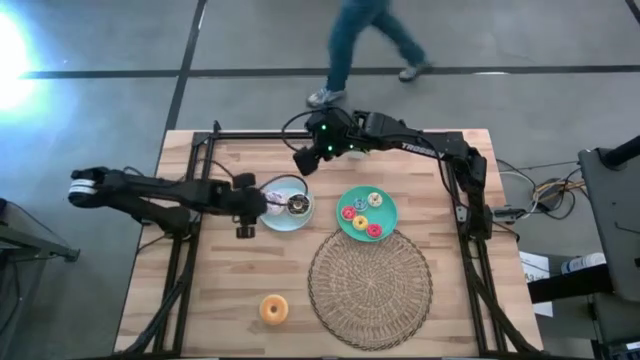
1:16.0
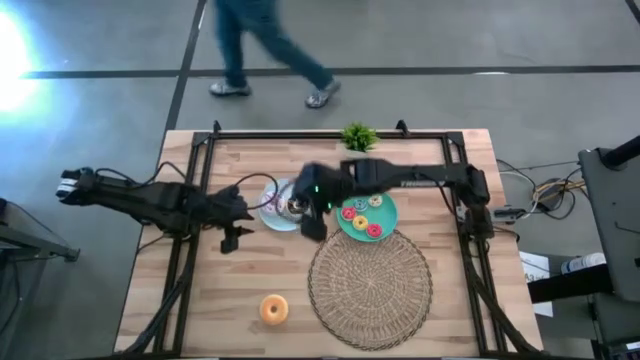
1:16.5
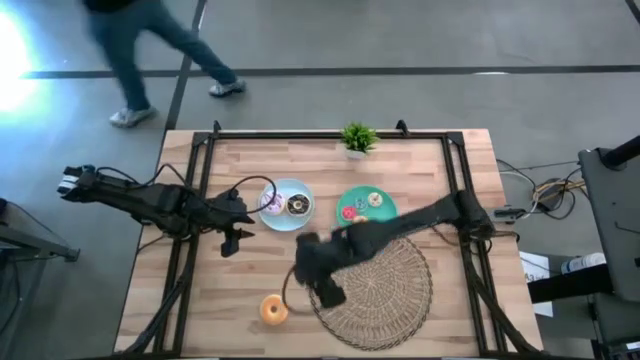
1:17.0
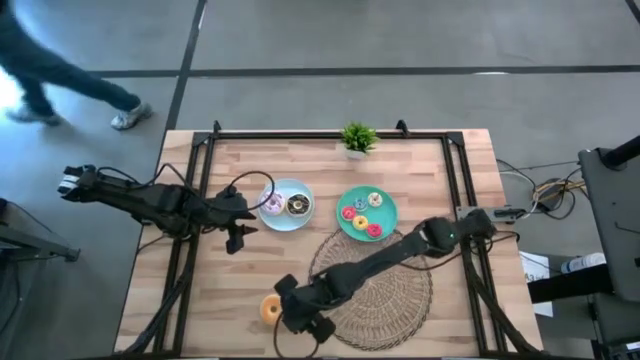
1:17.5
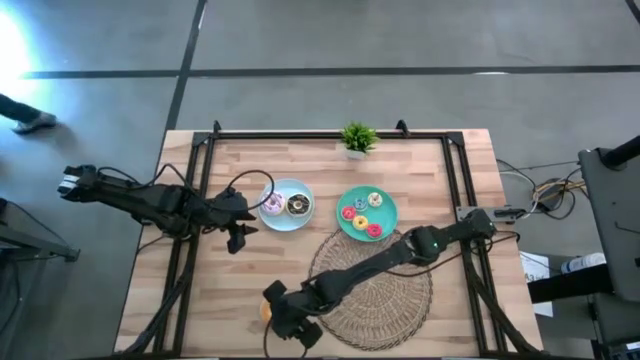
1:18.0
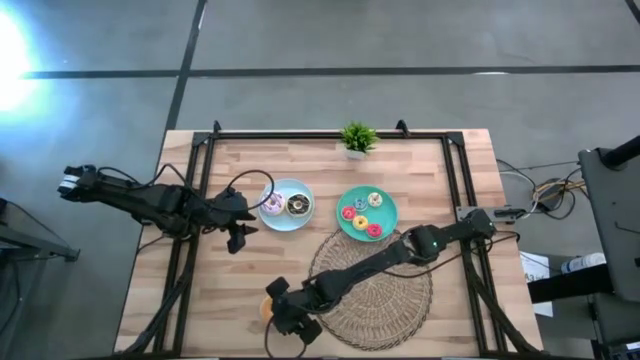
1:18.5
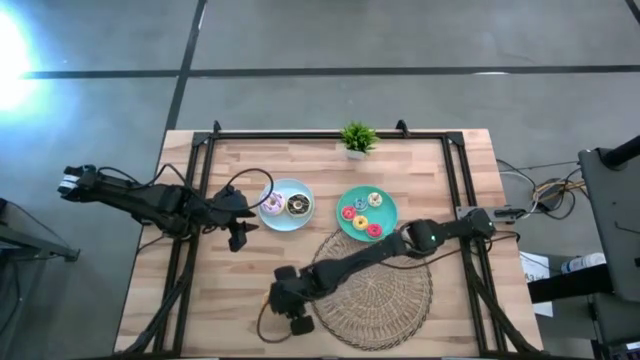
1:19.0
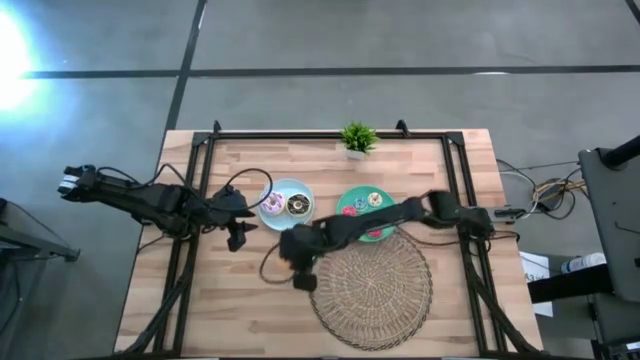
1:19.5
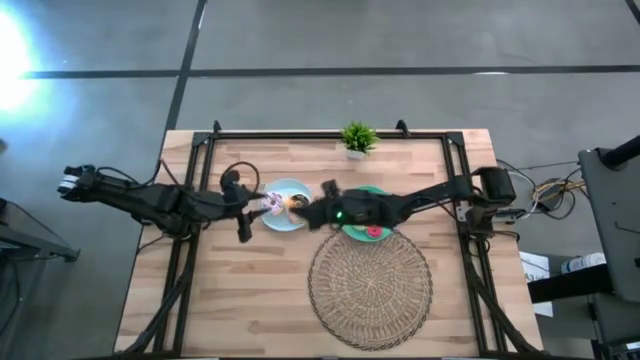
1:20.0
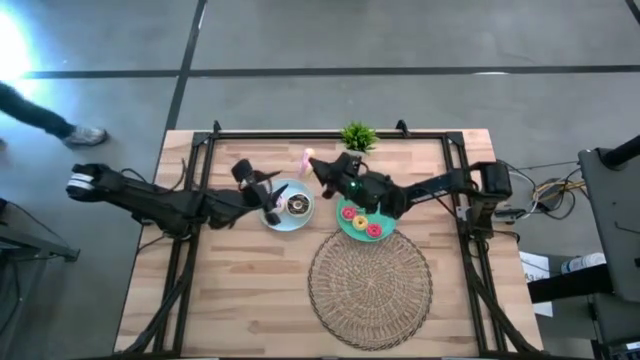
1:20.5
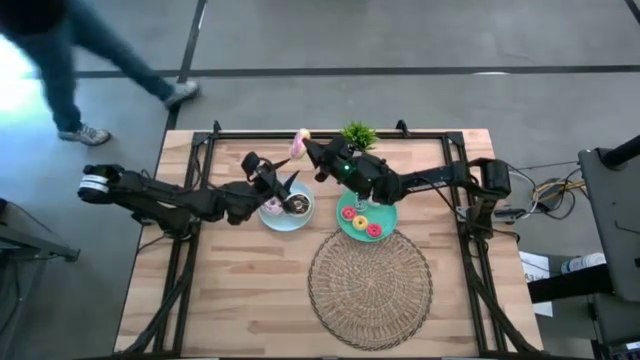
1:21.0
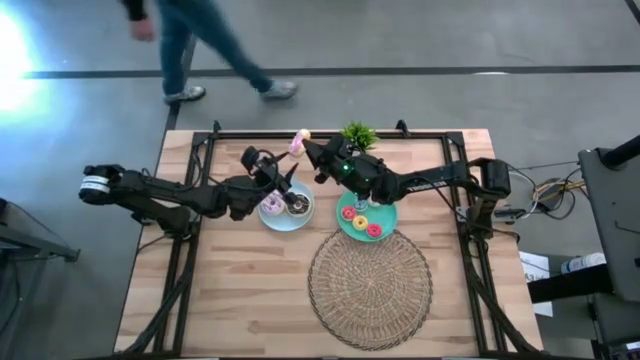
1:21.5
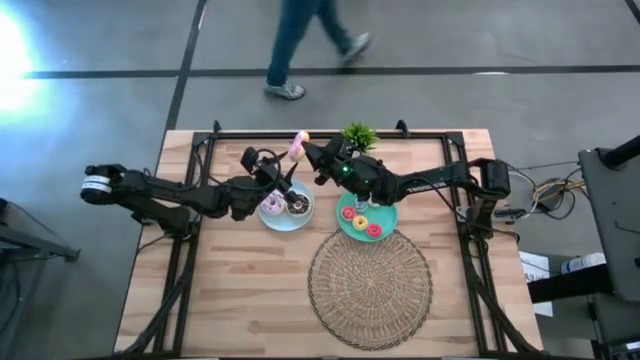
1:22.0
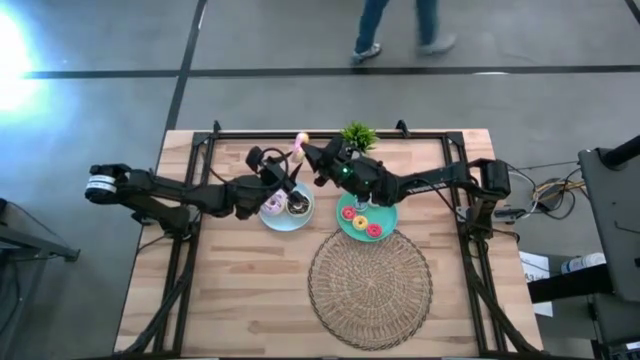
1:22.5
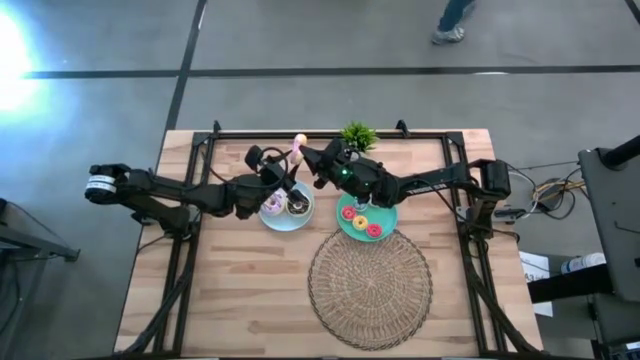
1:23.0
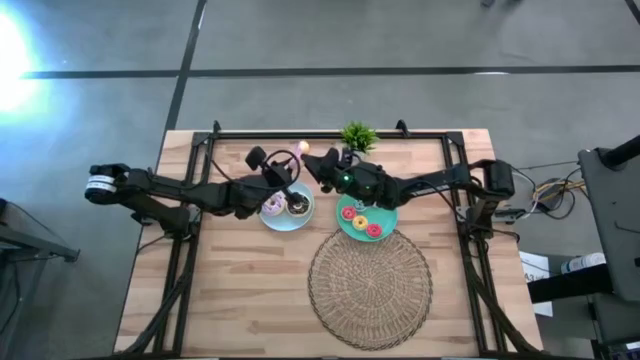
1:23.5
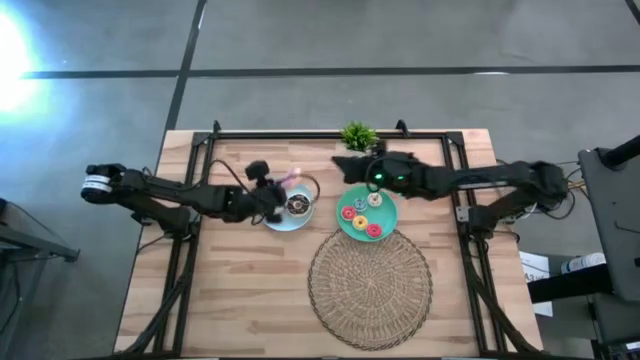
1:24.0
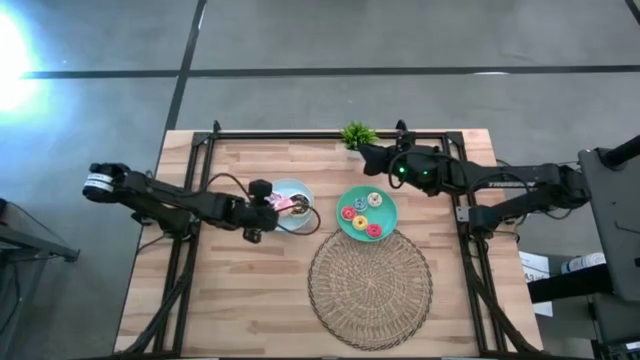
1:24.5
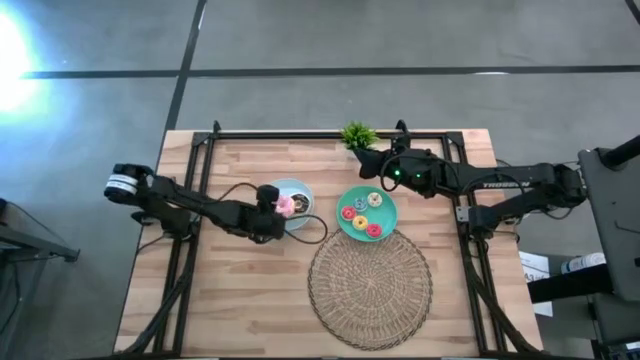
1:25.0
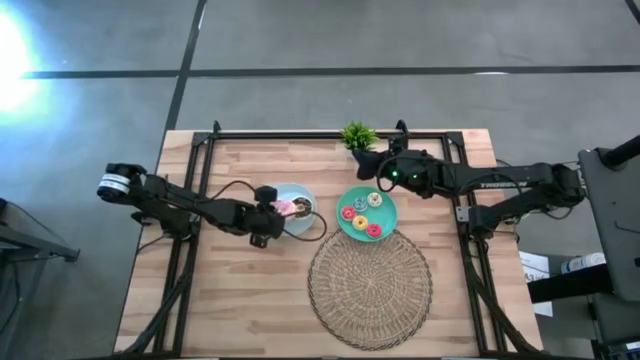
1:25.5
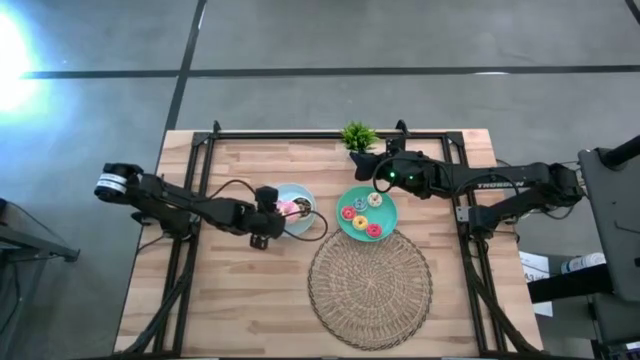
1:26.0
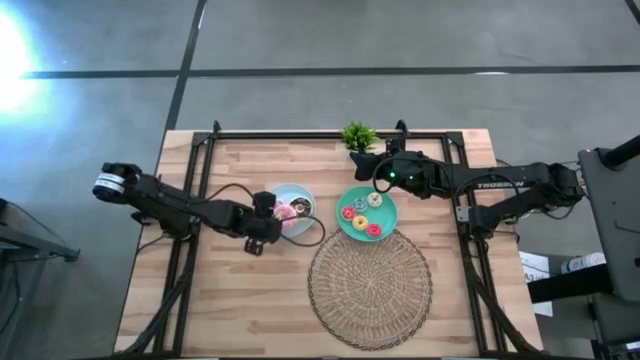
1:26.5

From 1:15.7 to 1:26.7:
Task: Pick & Place donuts
Put the big pink donut on the blue plate

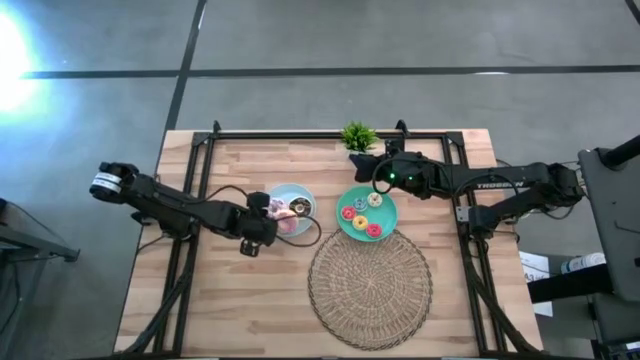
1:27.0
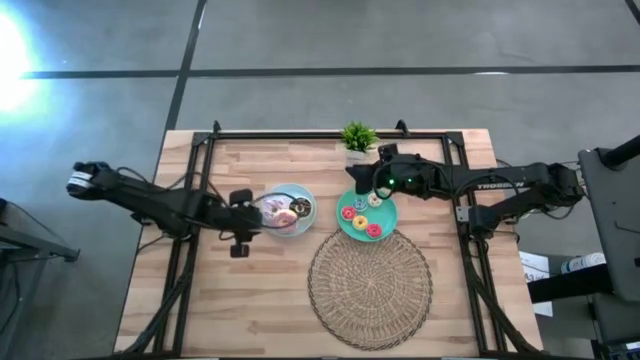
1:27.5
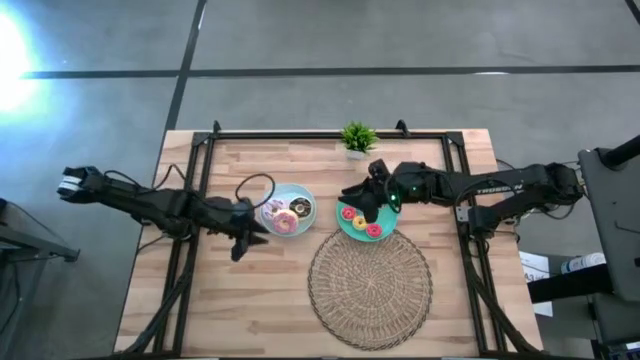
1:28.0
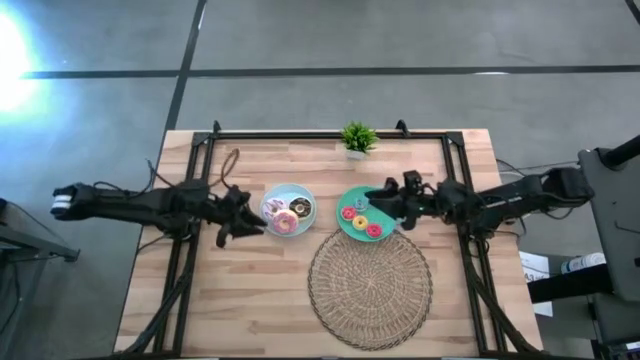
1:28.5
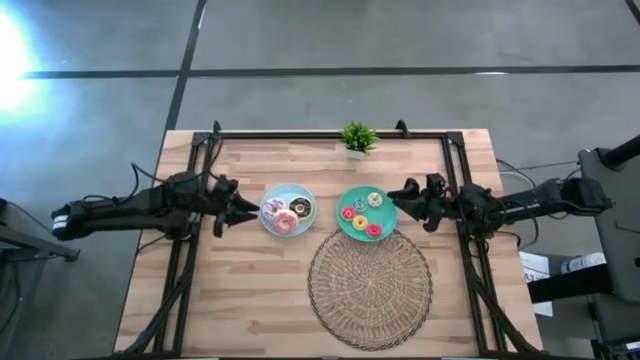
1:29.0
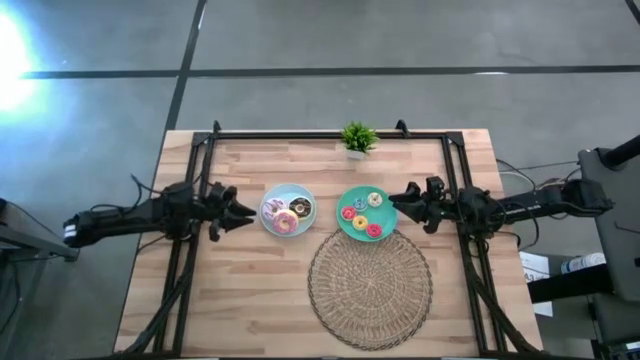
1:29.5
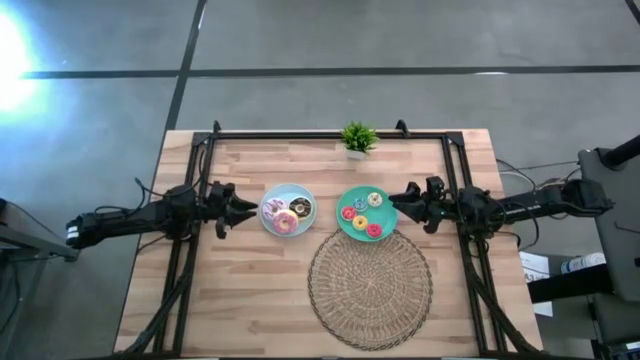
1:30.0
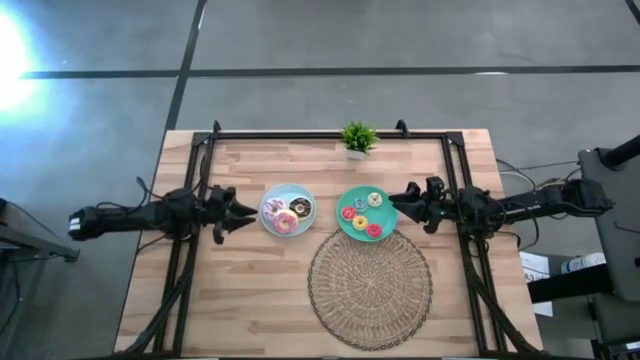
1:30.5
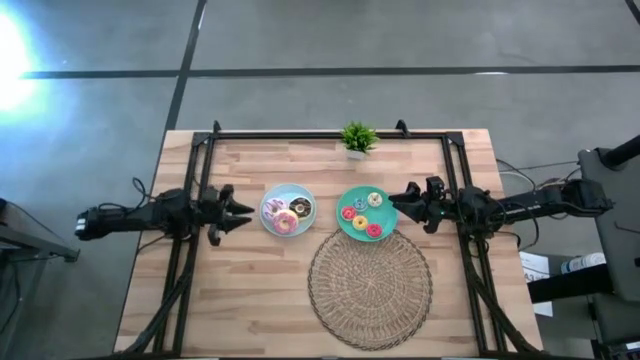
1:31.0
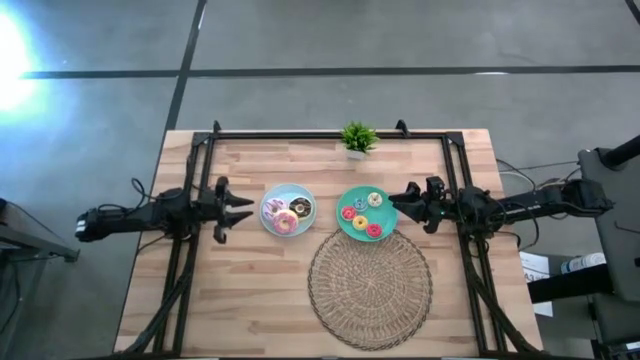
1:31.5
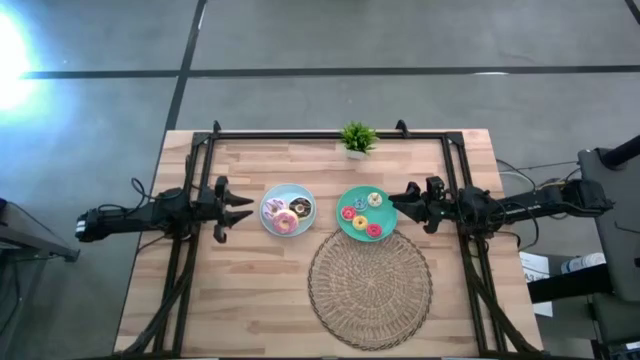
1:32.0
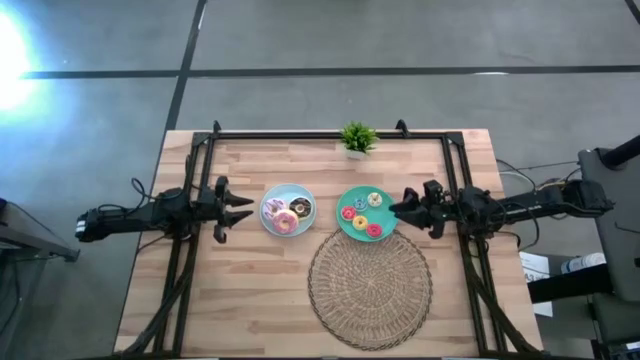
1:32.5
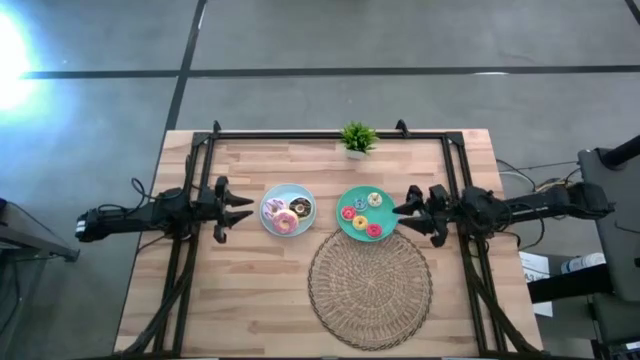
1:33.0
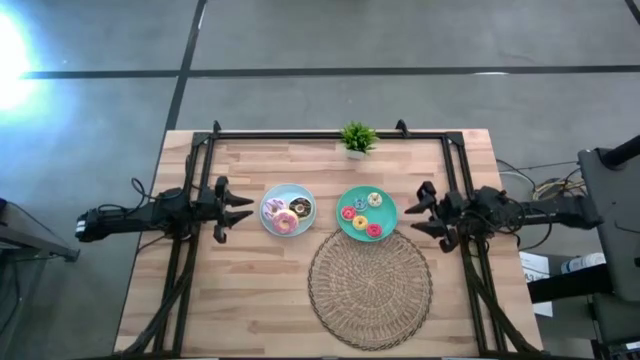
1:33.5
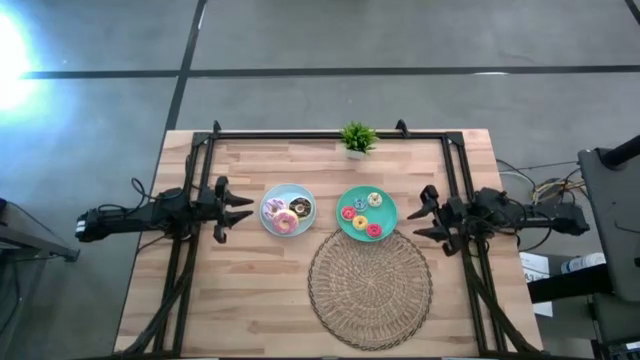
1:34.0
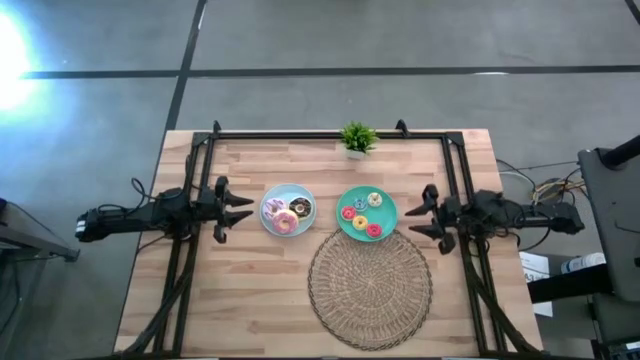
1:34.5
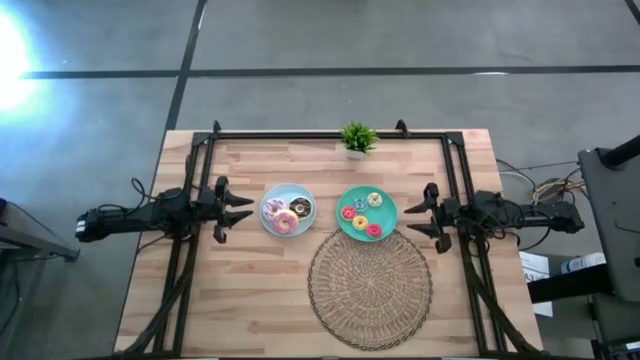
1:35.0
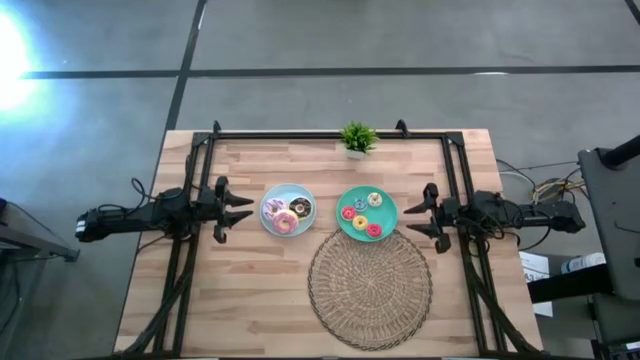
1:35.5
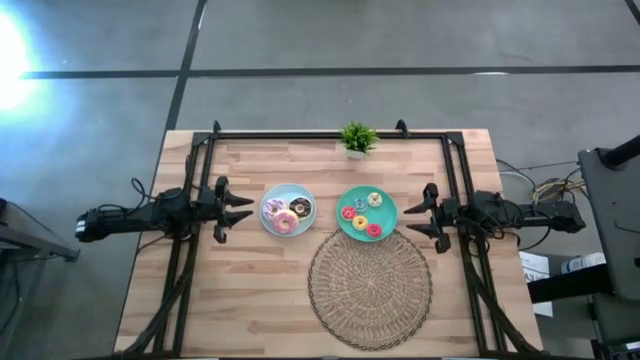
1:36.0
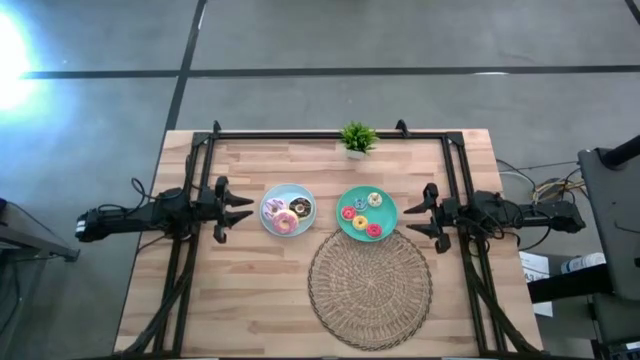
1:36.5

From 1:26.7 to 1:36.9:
Return to Home Position
